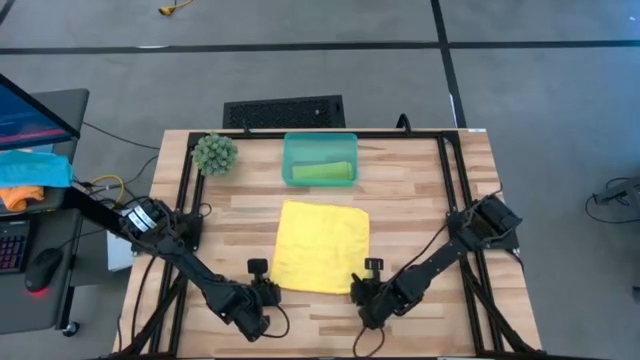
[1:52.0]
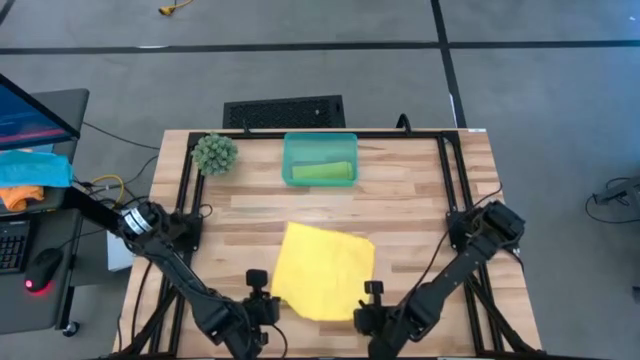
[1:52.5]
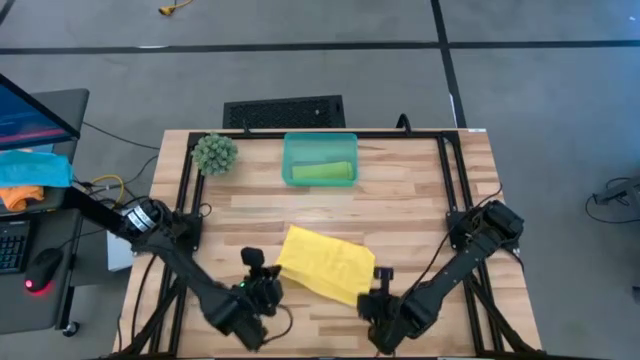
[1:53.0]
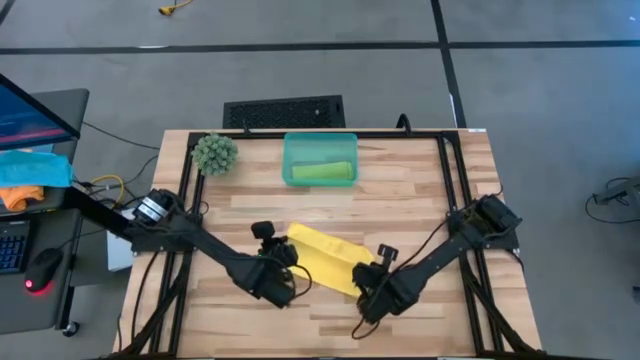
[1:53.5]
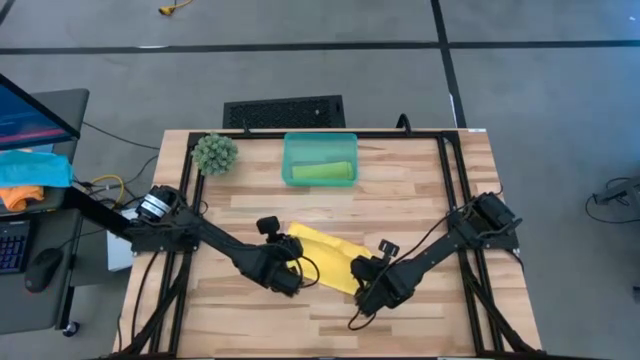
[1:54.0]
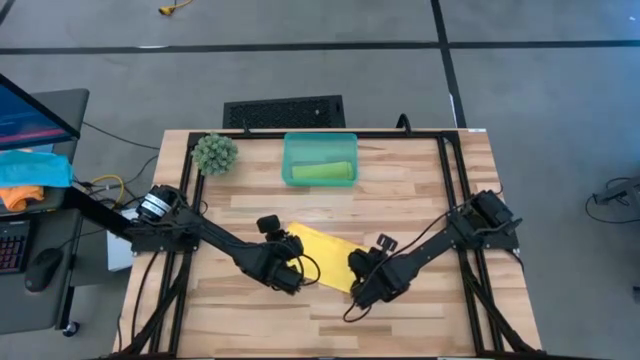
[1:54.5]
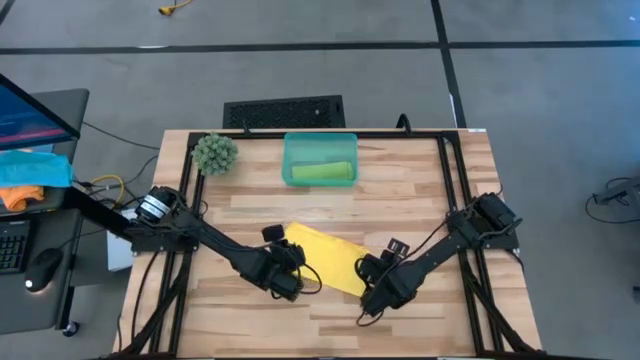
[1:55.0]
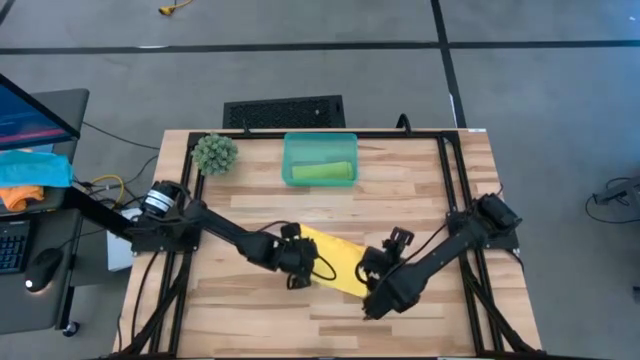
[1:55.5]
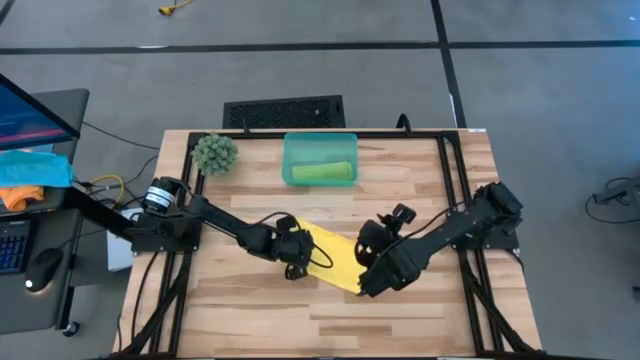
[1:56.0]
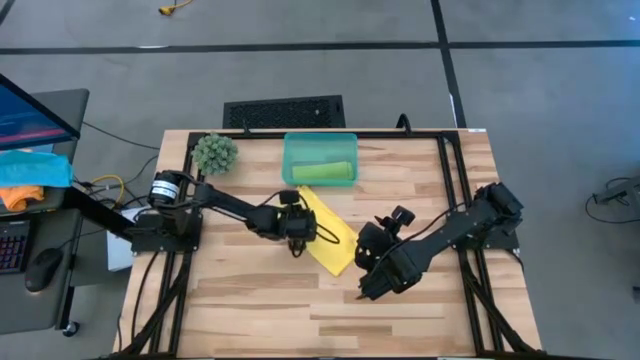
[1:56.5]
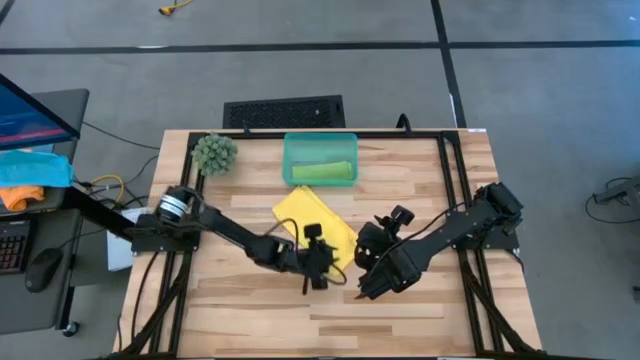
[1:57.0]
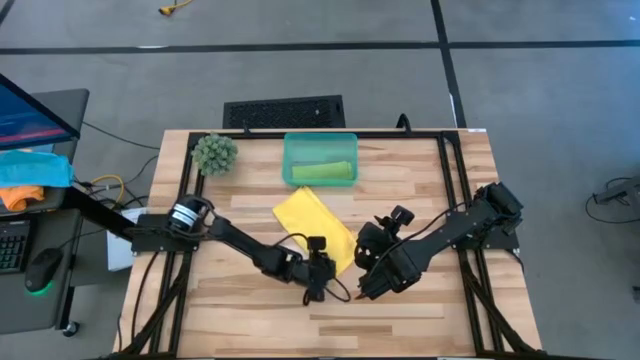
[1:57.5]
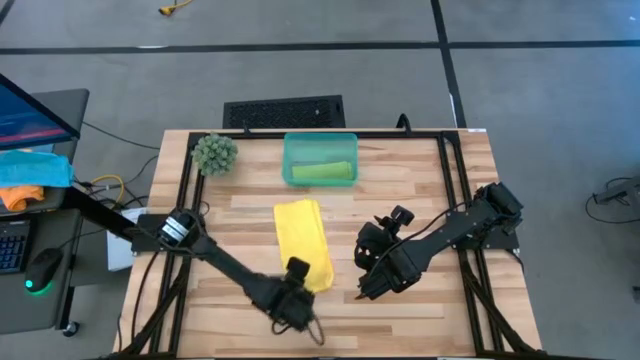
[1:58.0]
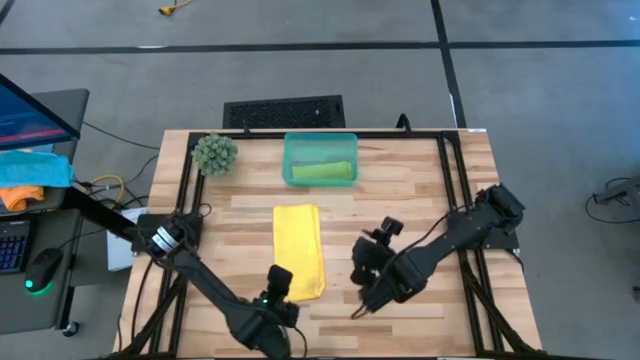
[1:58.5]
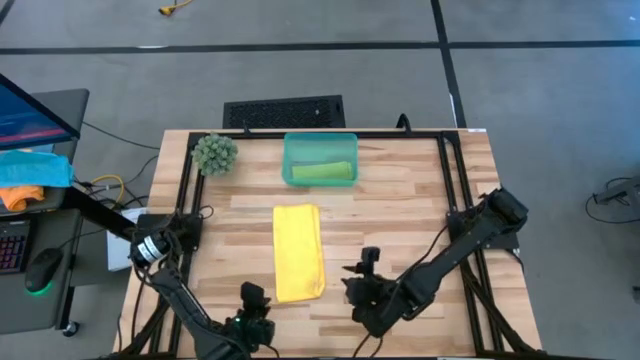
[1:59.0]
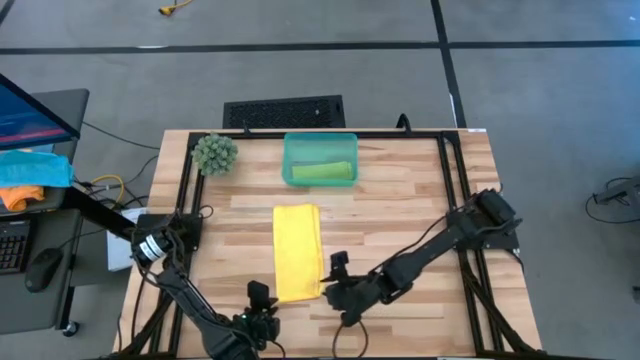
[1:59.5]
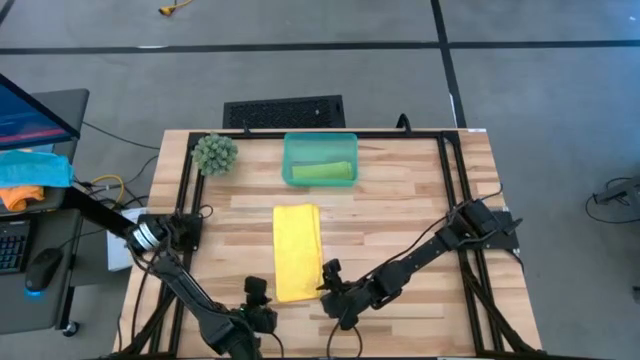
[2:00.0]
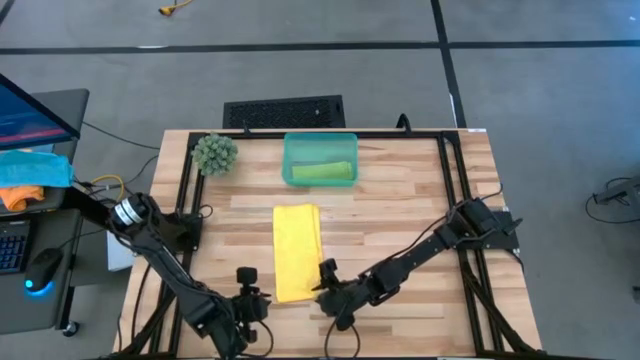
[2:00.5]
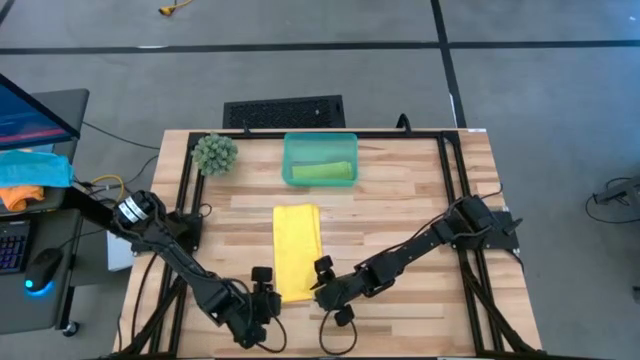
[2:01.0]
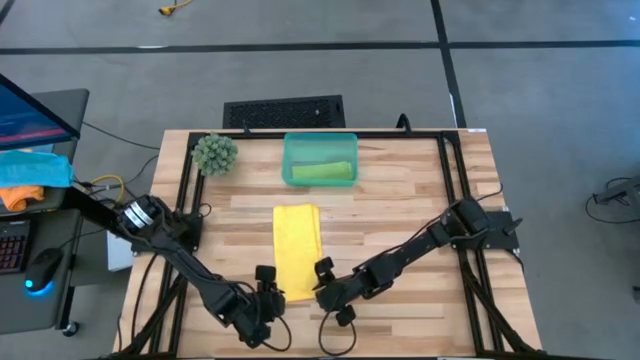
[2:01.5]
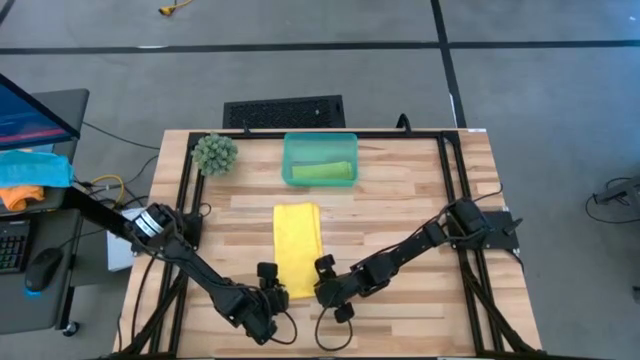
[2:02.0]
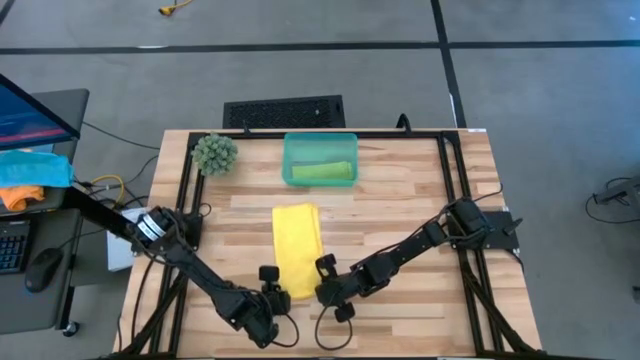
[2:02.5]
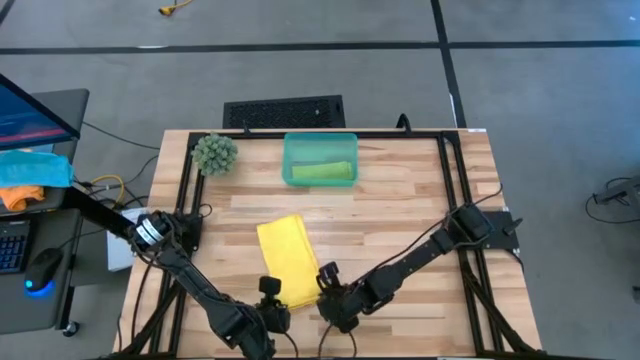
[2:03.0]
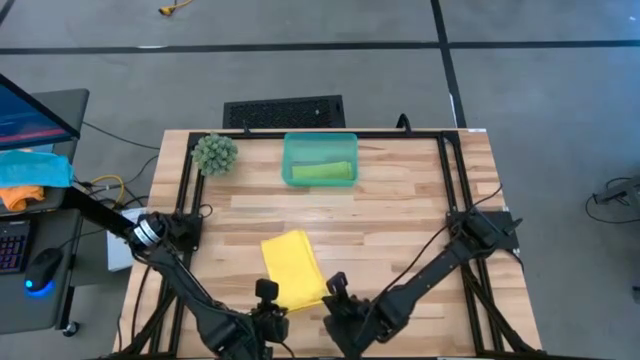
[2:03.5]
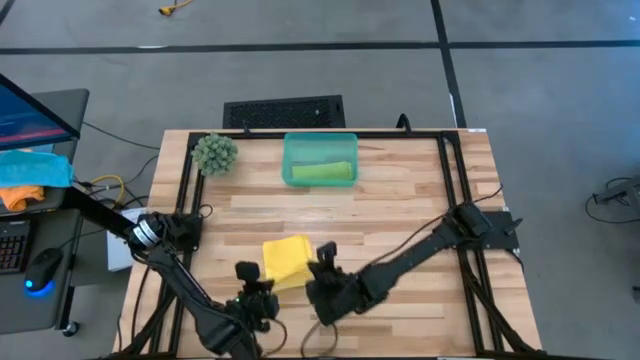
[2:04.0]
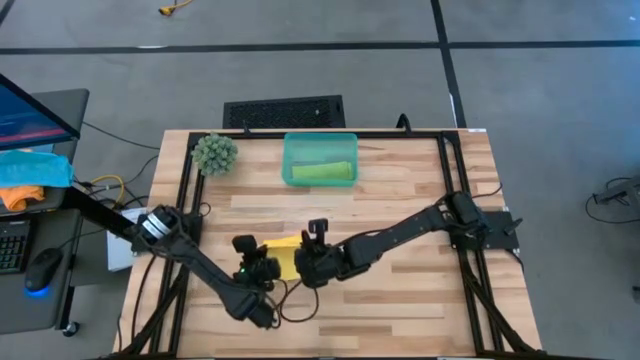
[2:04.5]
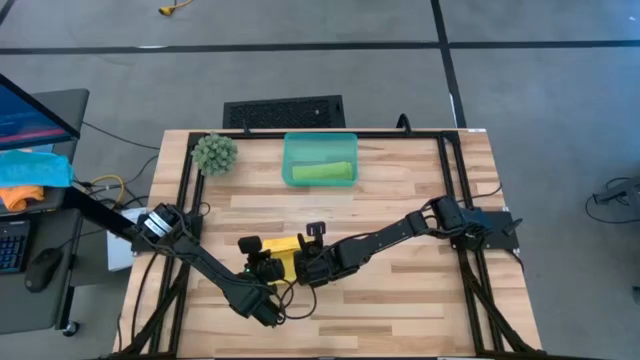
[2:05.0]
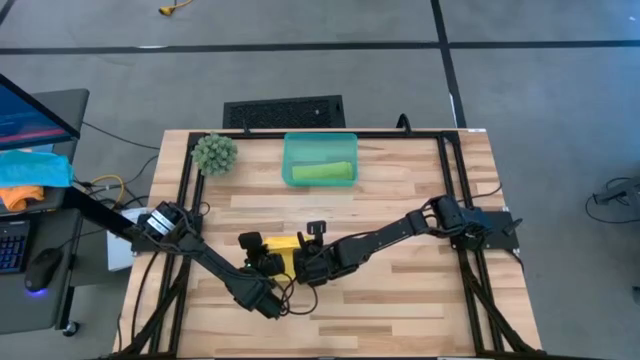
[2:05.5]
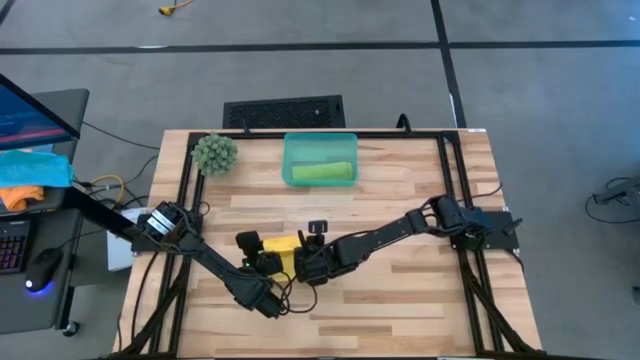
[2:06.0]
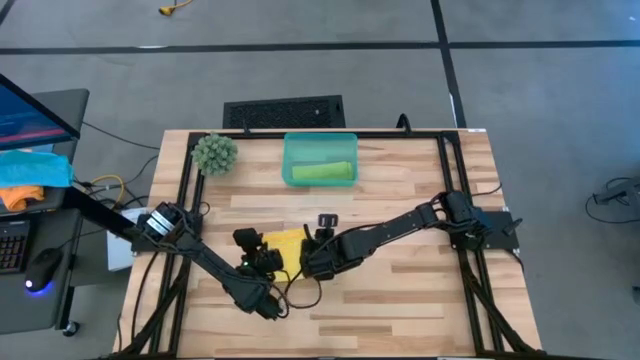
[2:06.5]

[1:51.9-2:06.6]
Task: Roll microfiber towels into tight, uniform cylinder then place into a basket
Fold the yellow microfiber cloth
